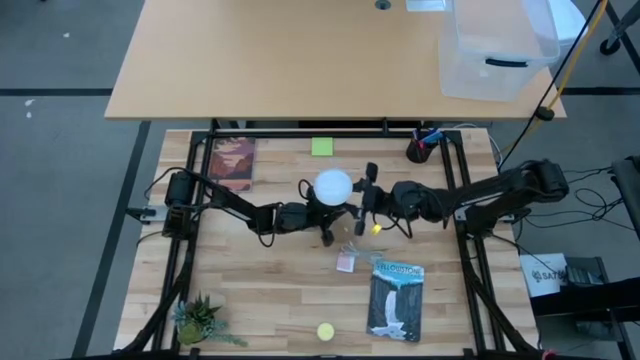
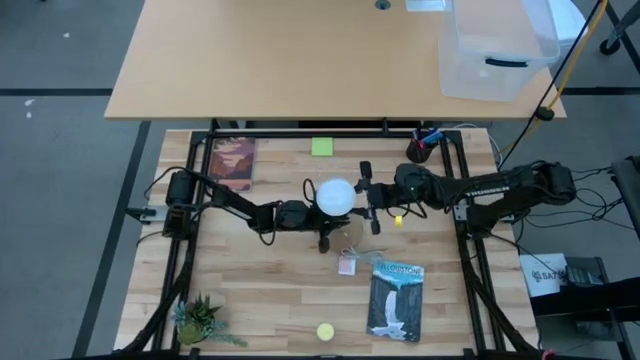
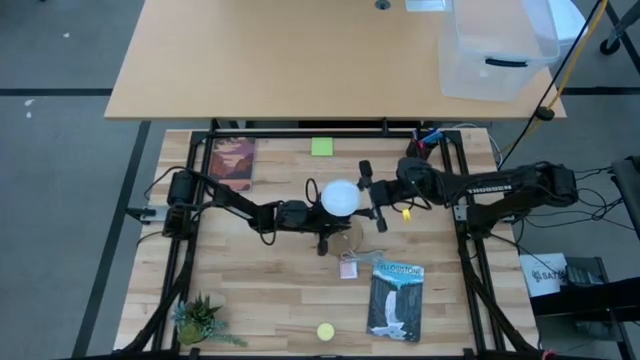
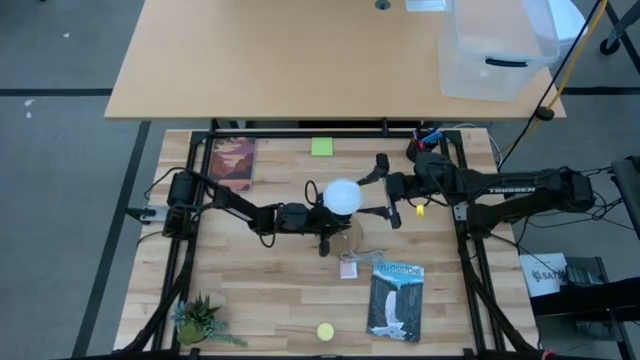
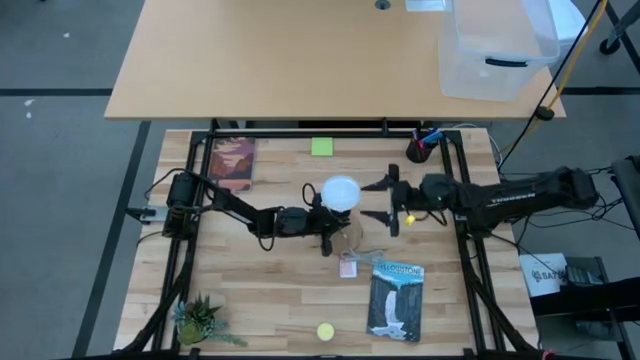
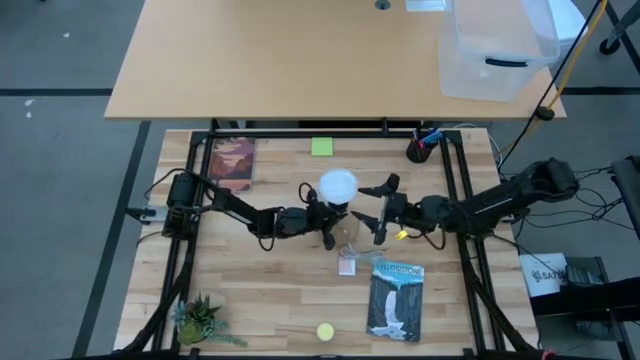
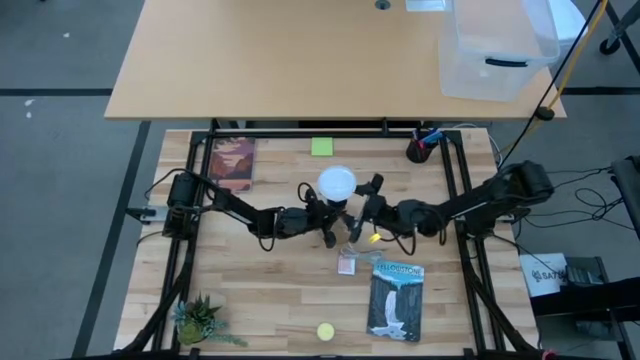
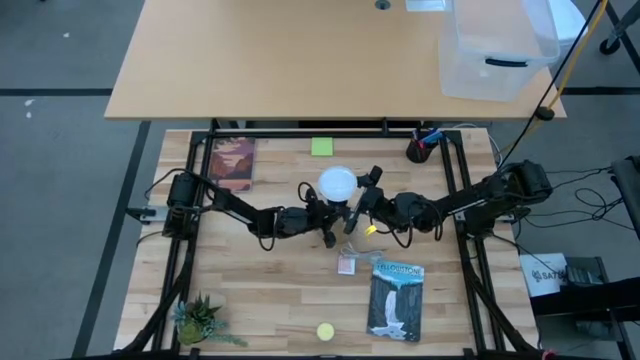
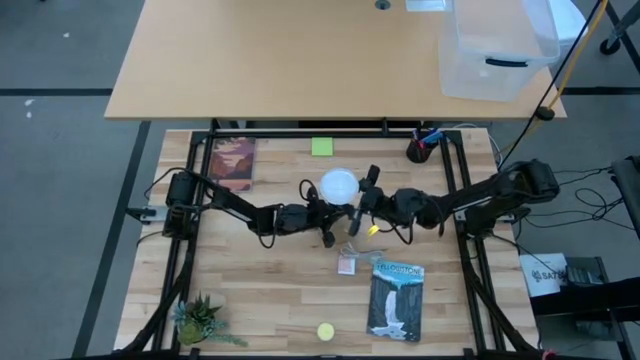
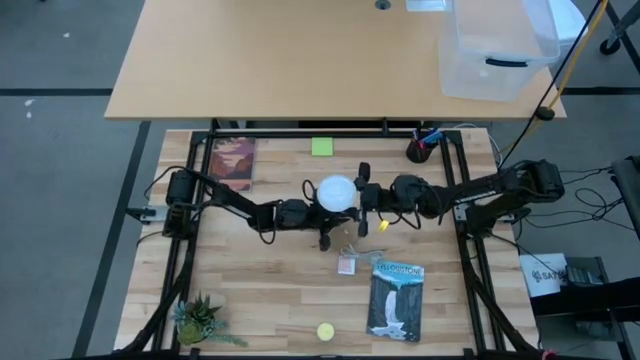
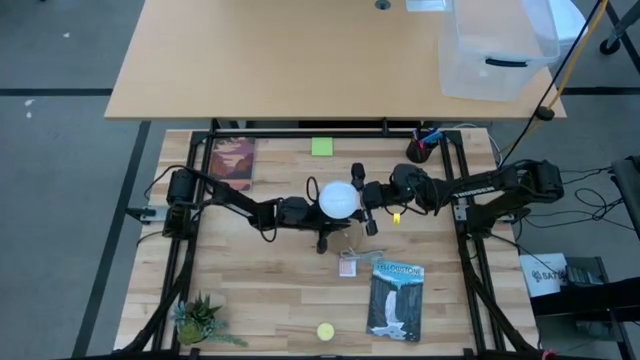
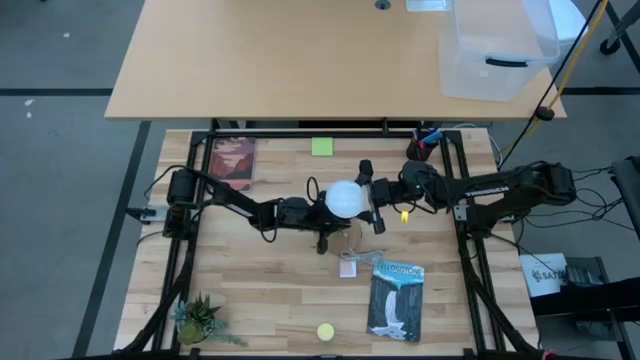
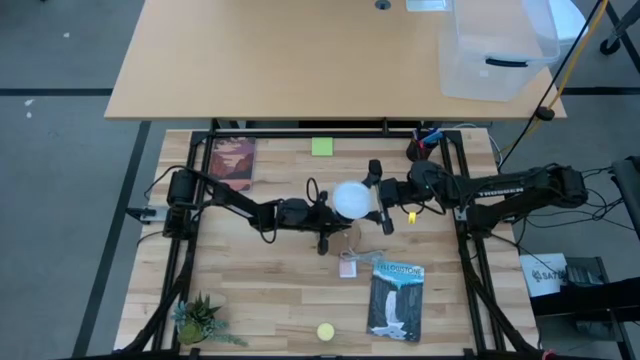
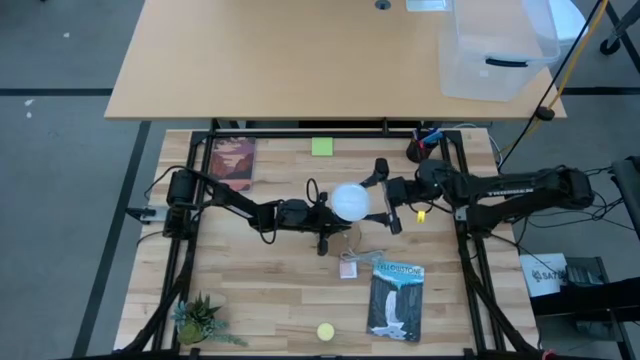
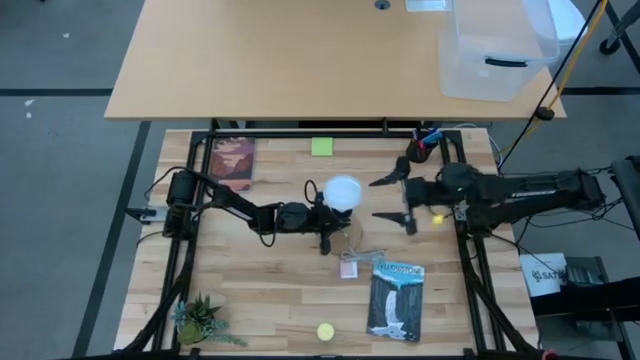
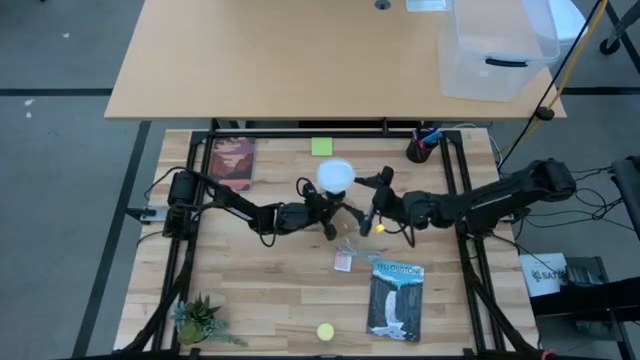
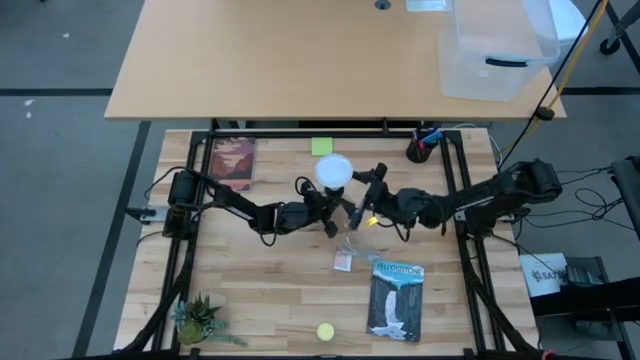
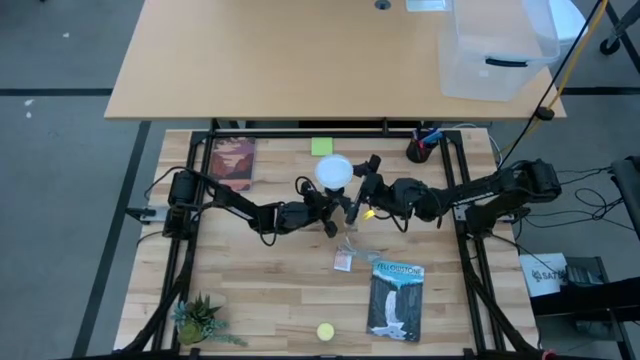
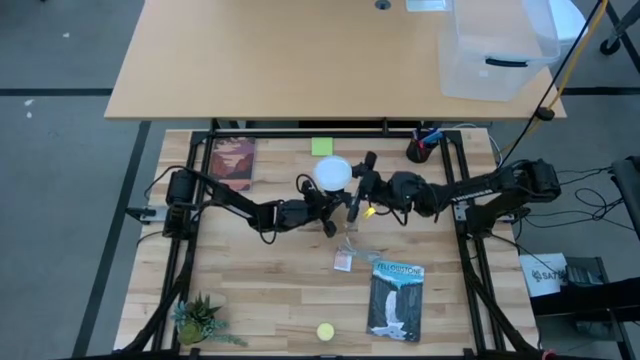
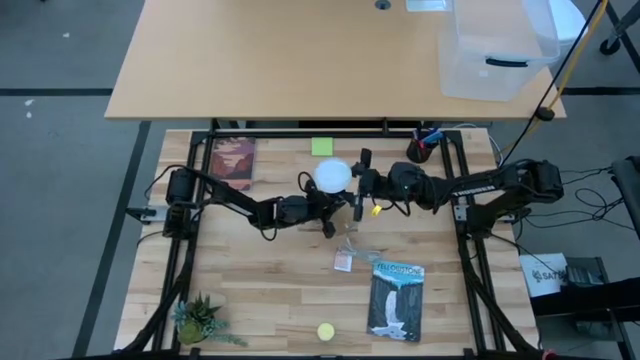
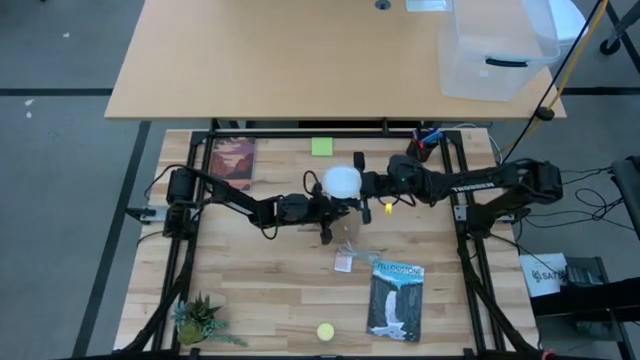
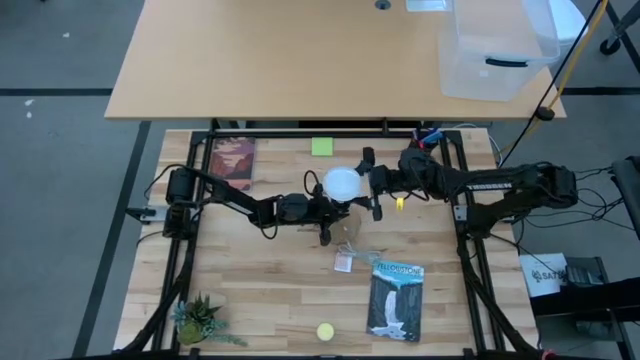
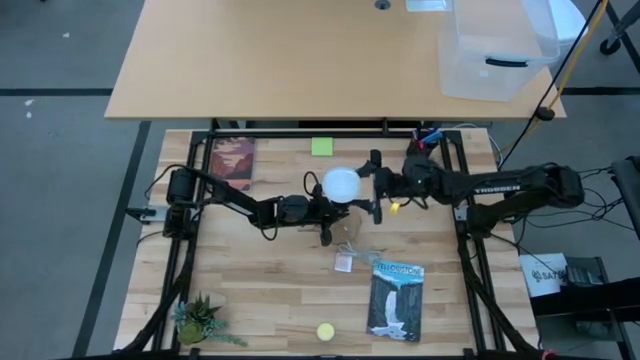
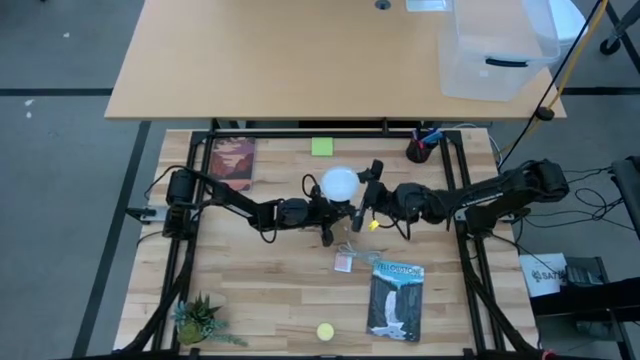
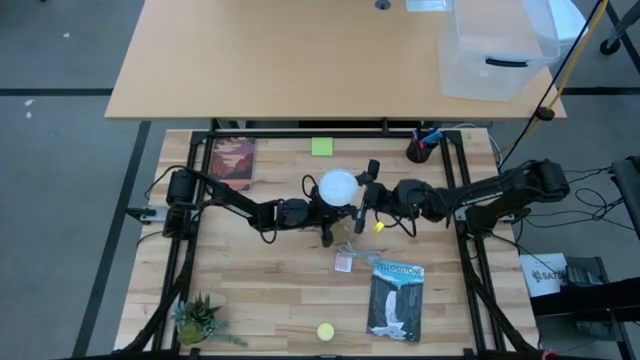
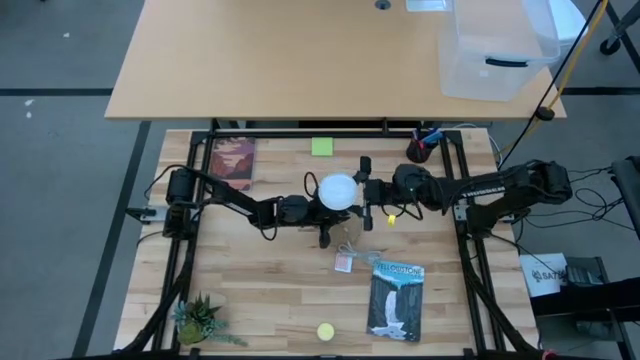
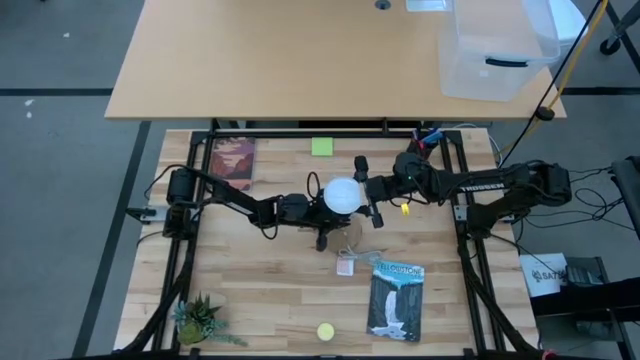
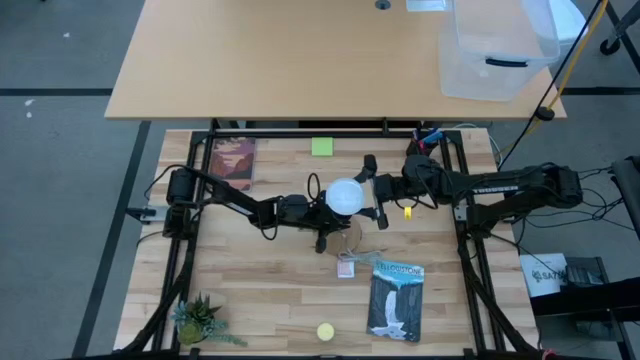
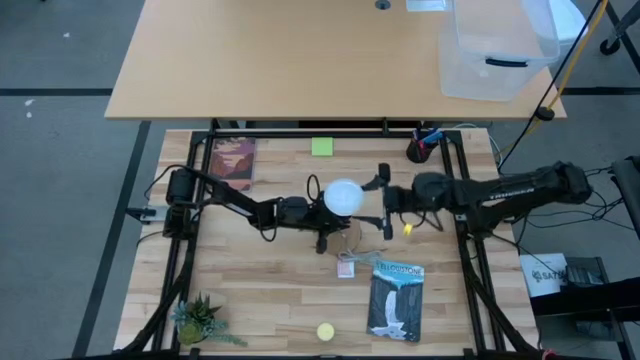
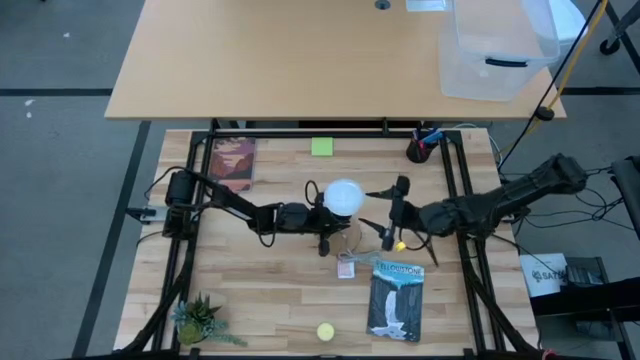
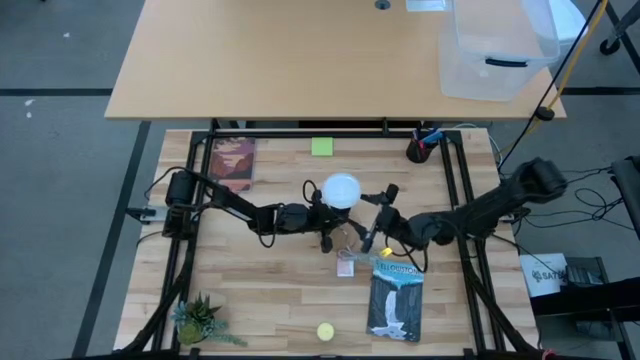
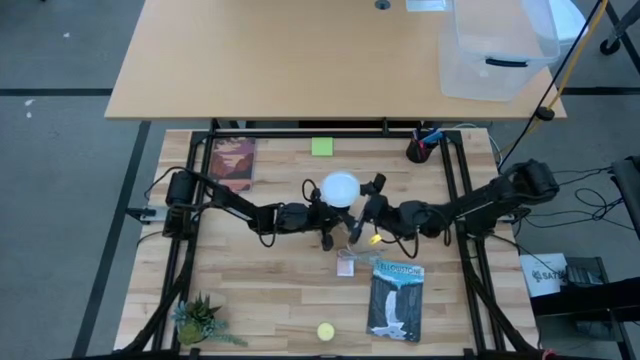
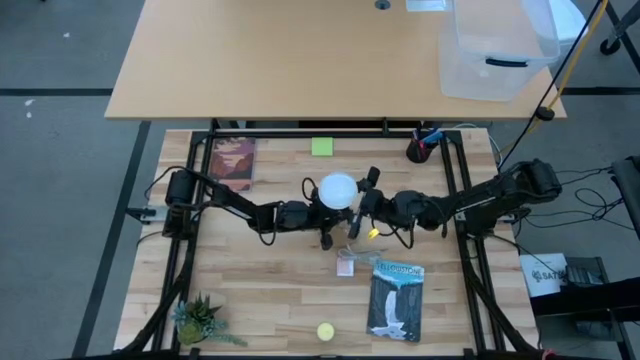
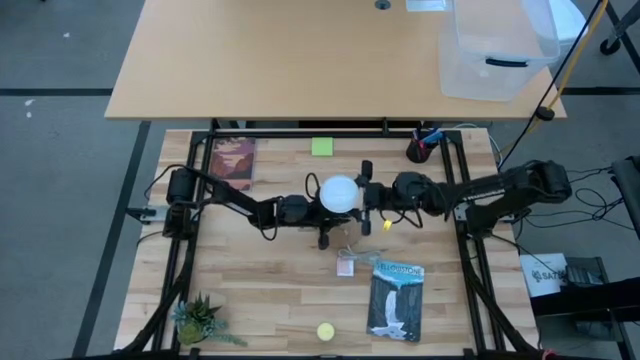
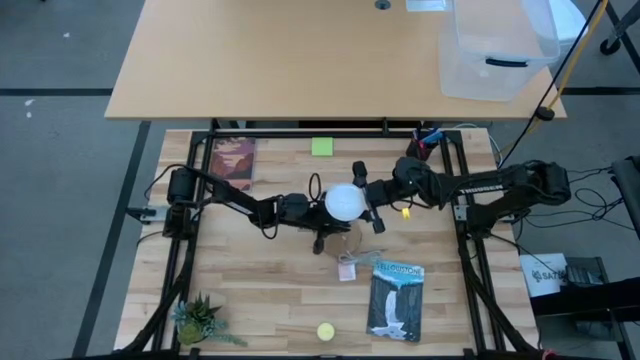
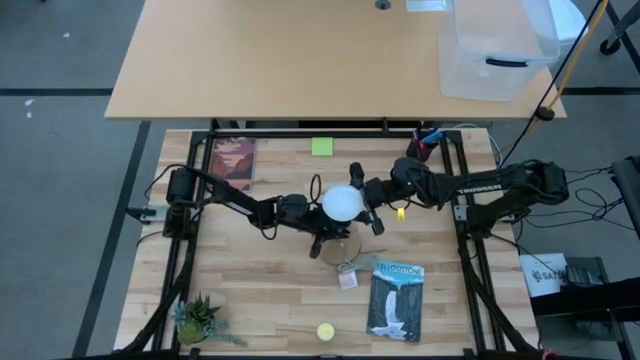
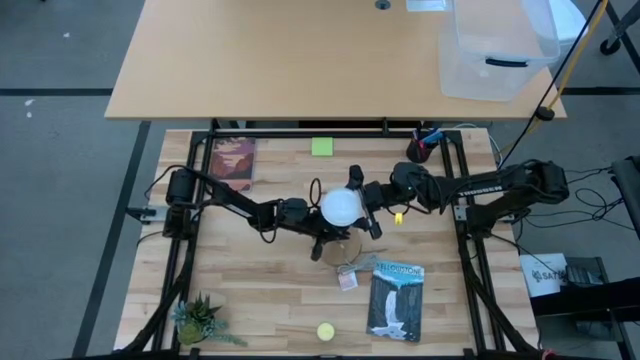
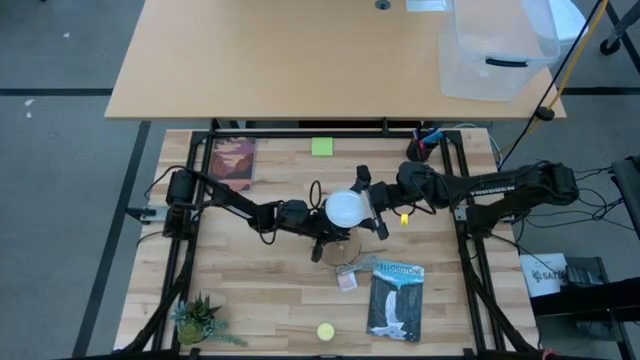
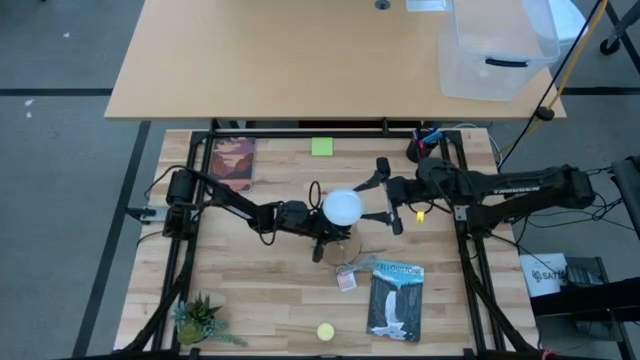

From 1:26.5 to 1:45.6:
Task: Screw lightbulb
Remove the white lightbulb from the brown lamp

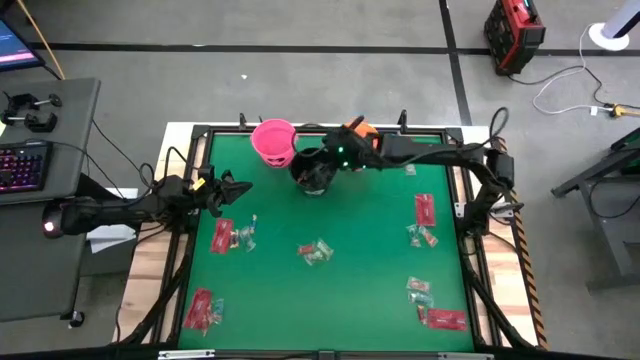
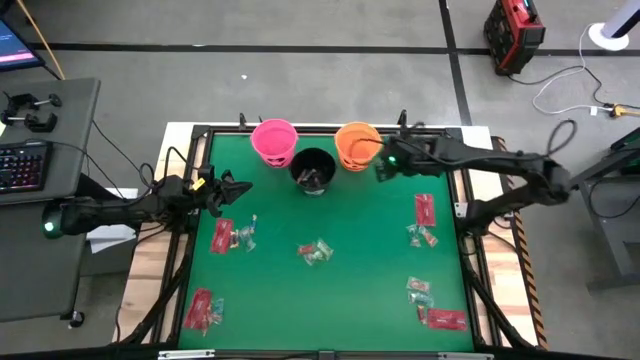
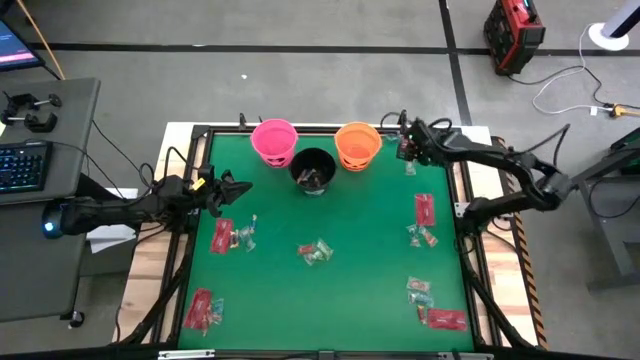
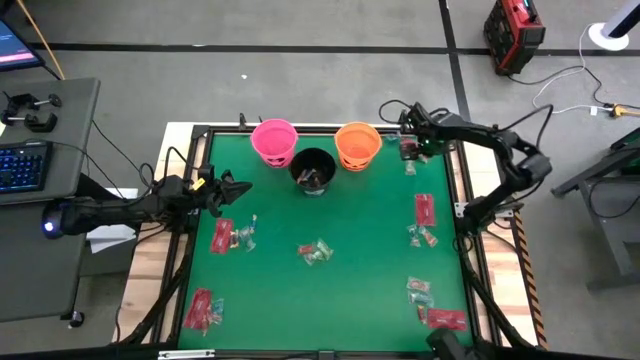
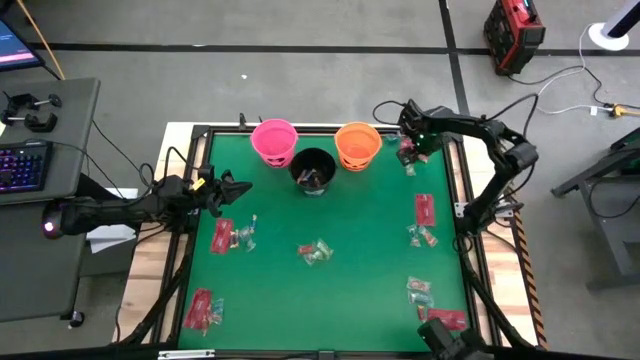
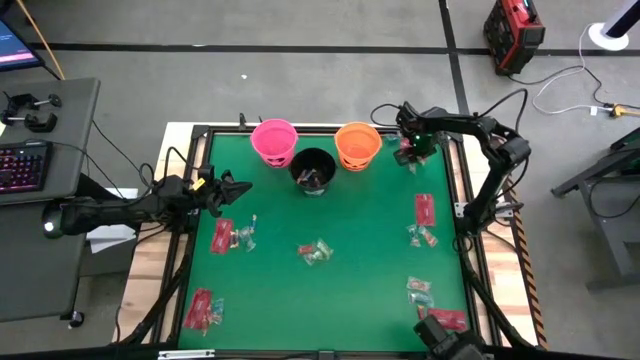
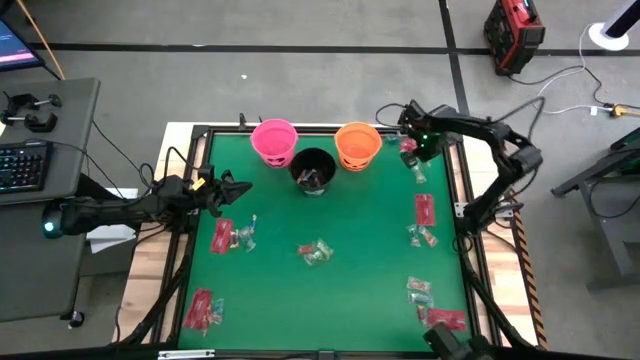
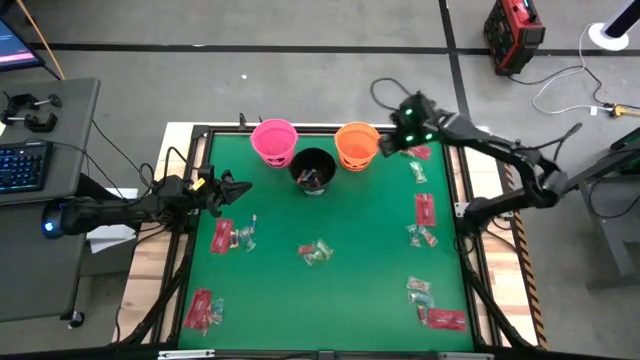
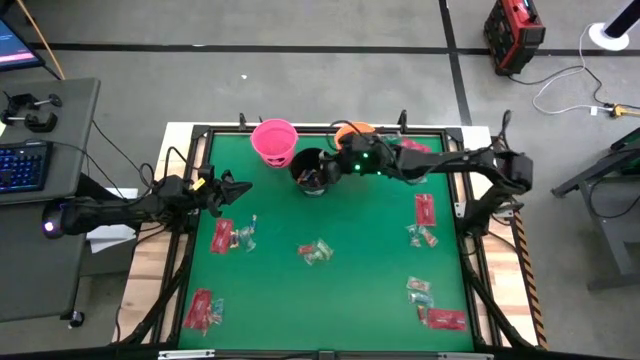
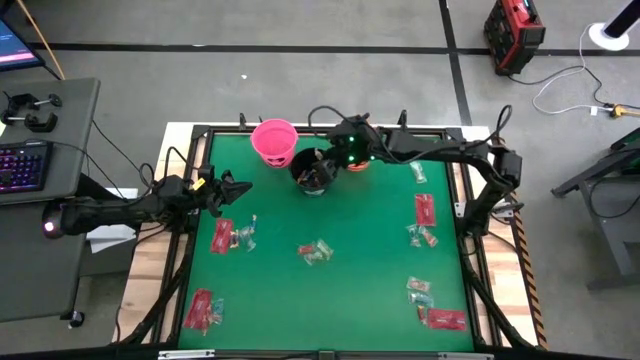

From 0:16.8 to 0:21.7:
Task: Sort candy by brand, put in halloween buckets
Put the green candy into the black bucket
